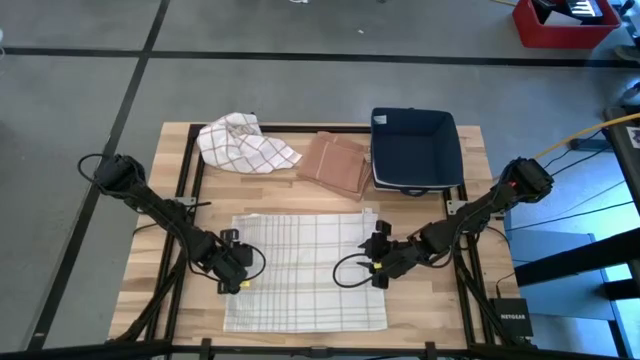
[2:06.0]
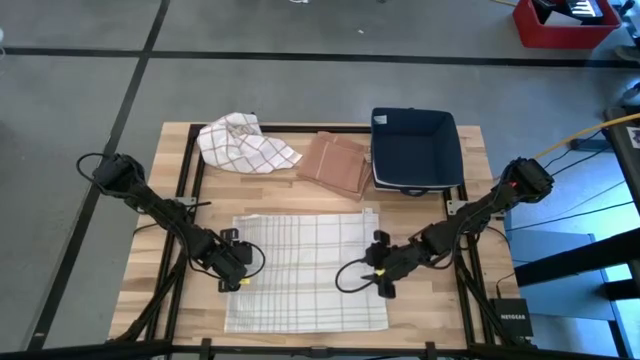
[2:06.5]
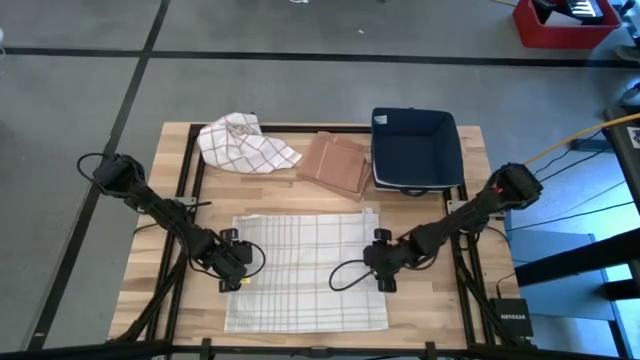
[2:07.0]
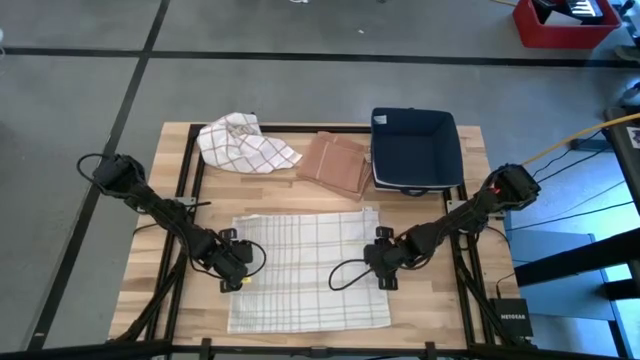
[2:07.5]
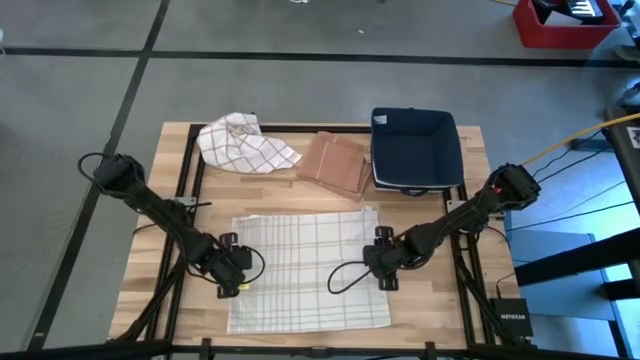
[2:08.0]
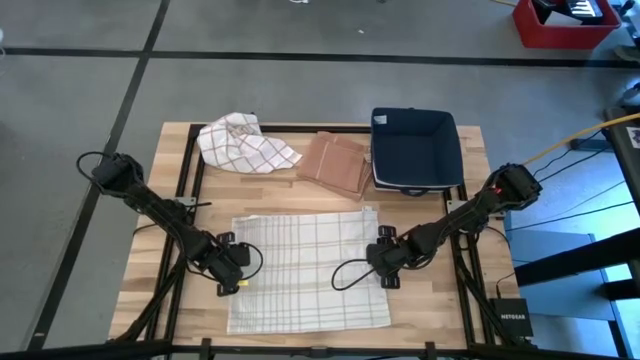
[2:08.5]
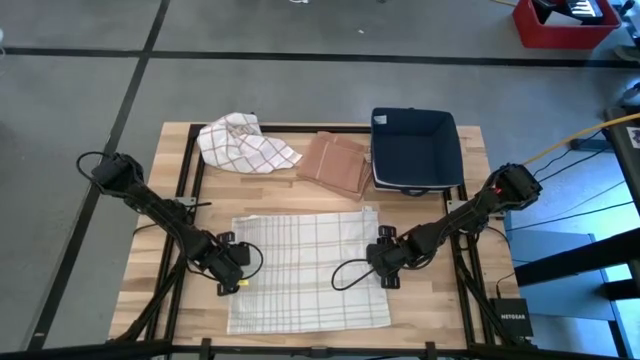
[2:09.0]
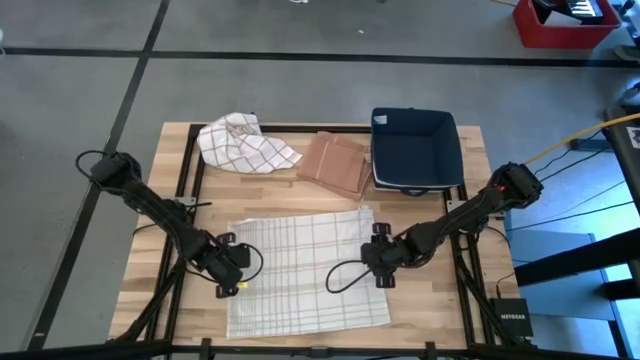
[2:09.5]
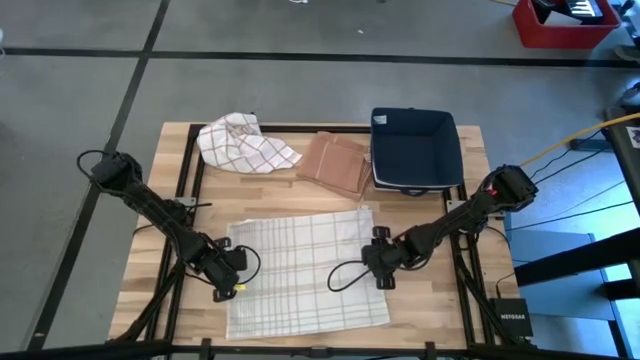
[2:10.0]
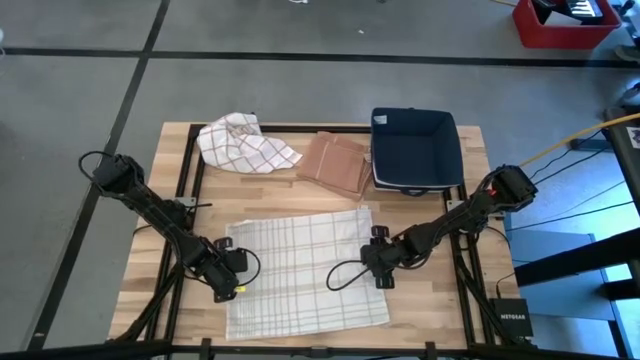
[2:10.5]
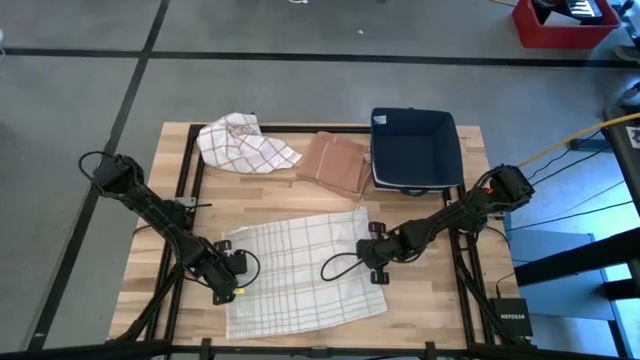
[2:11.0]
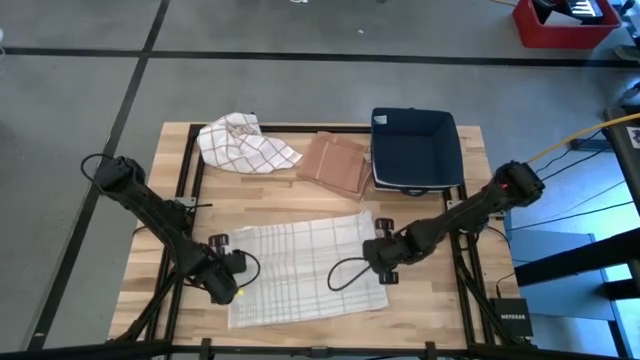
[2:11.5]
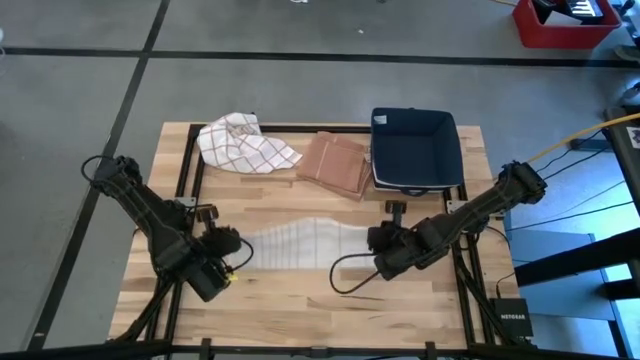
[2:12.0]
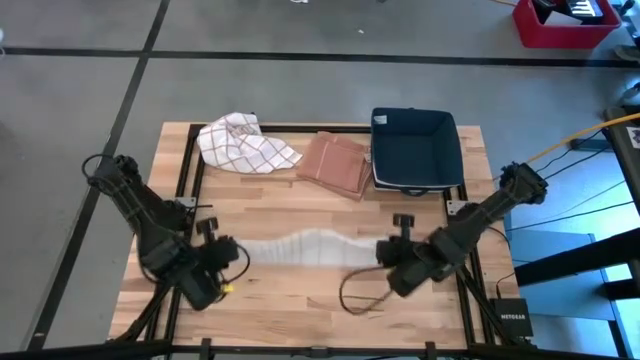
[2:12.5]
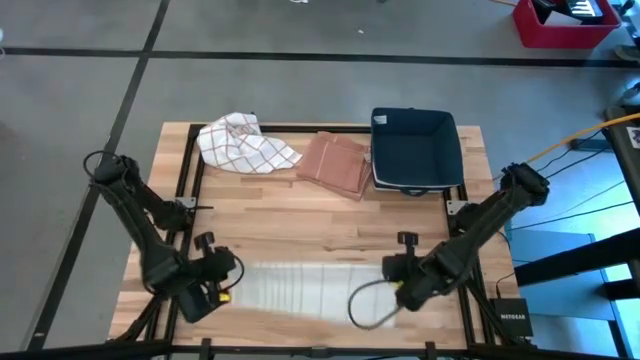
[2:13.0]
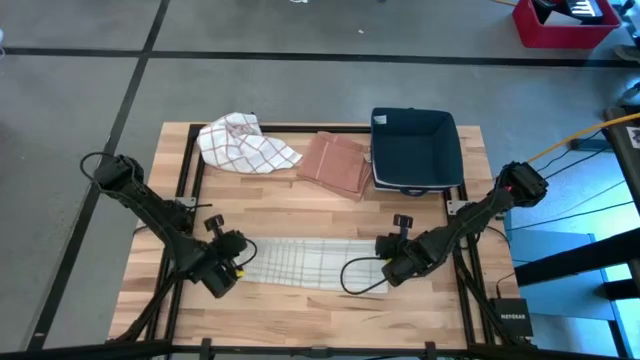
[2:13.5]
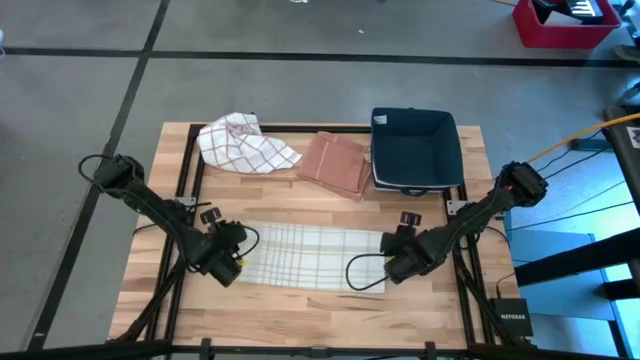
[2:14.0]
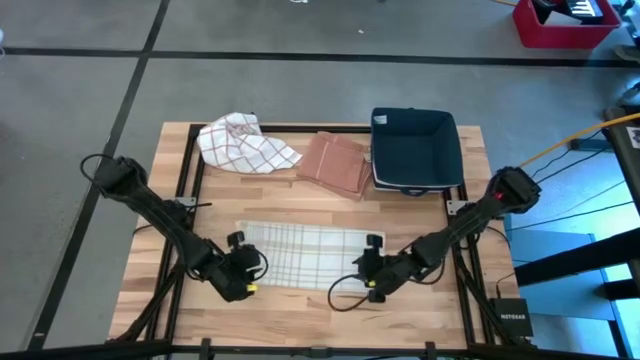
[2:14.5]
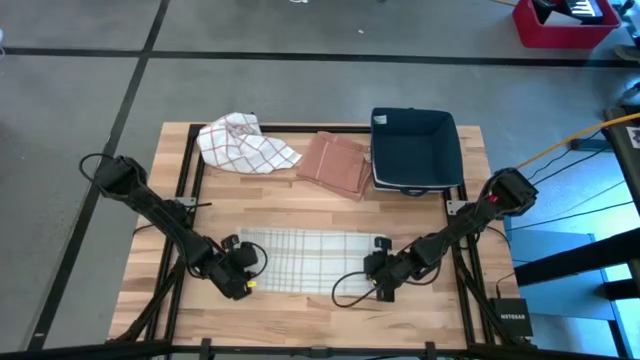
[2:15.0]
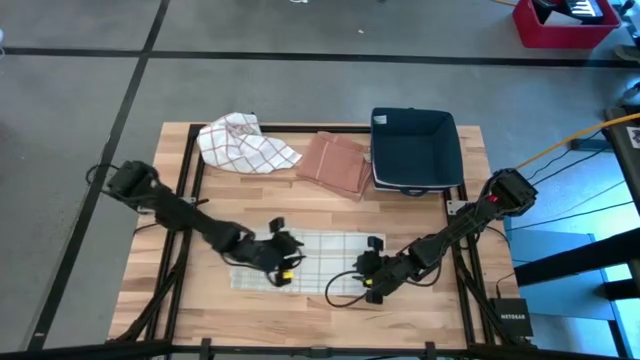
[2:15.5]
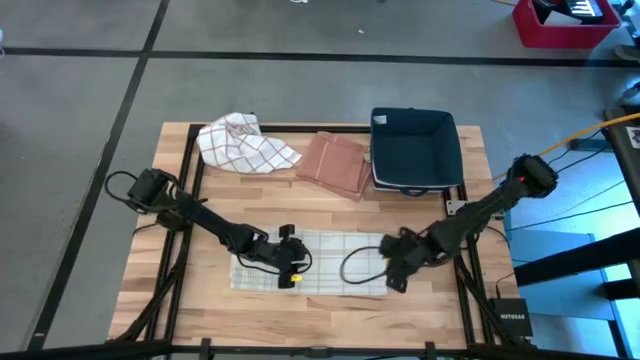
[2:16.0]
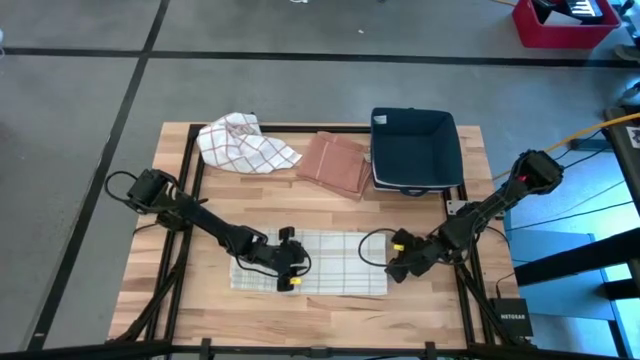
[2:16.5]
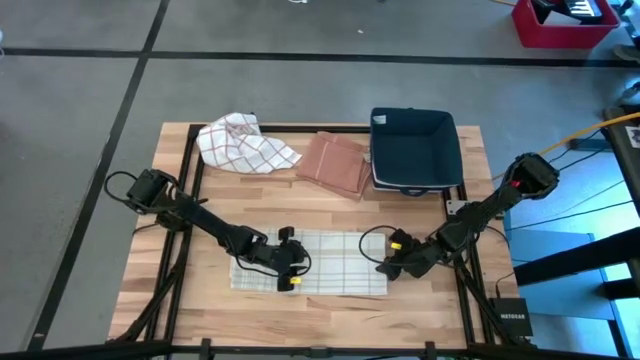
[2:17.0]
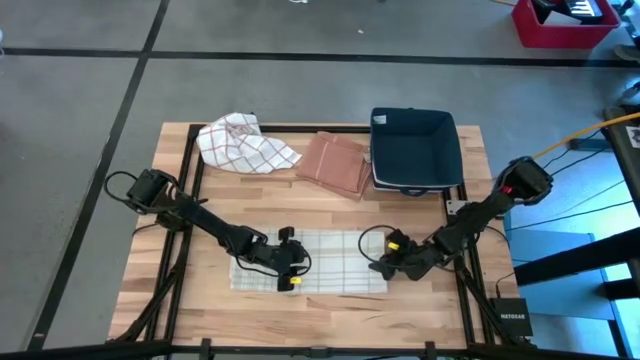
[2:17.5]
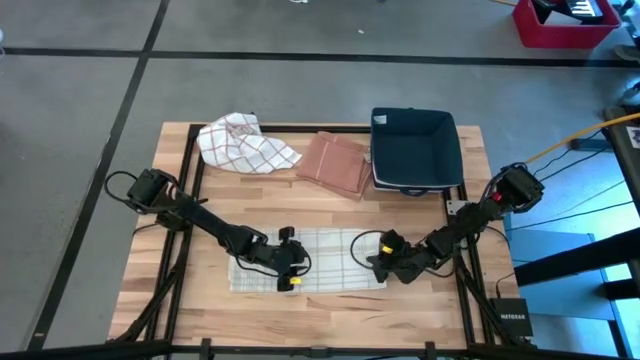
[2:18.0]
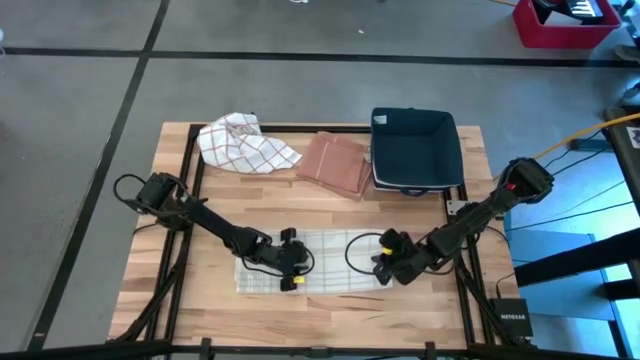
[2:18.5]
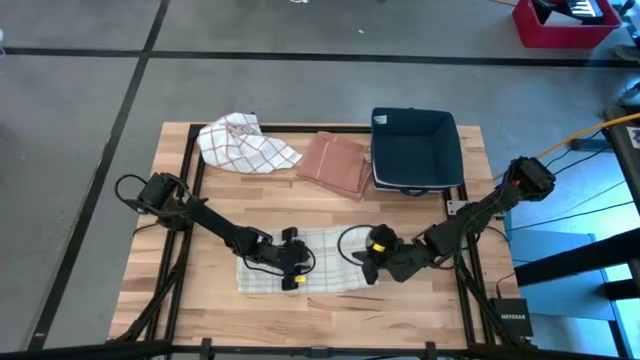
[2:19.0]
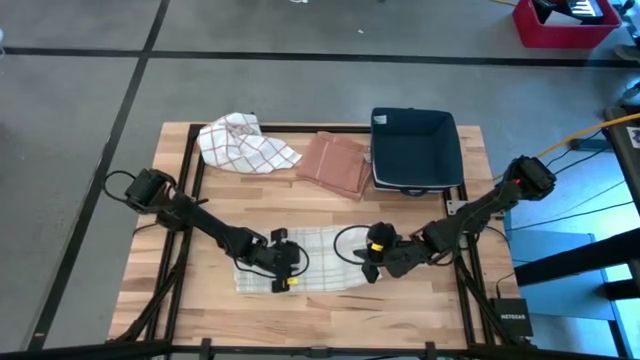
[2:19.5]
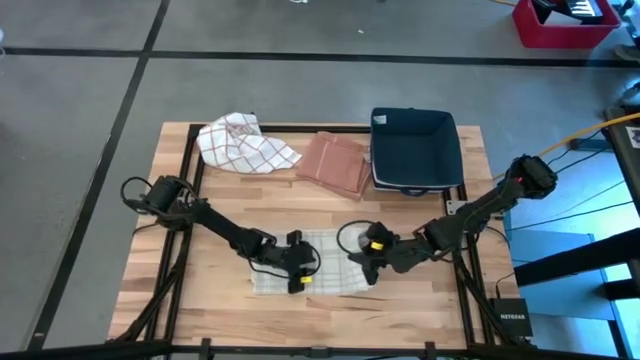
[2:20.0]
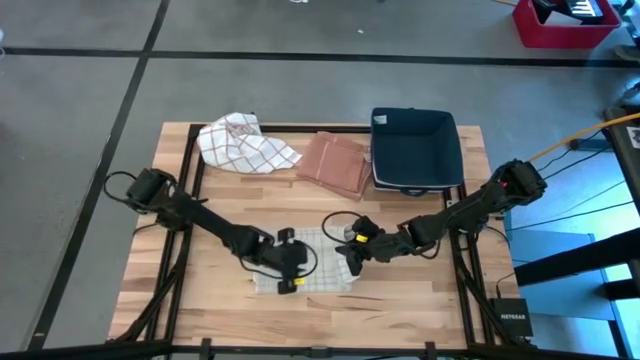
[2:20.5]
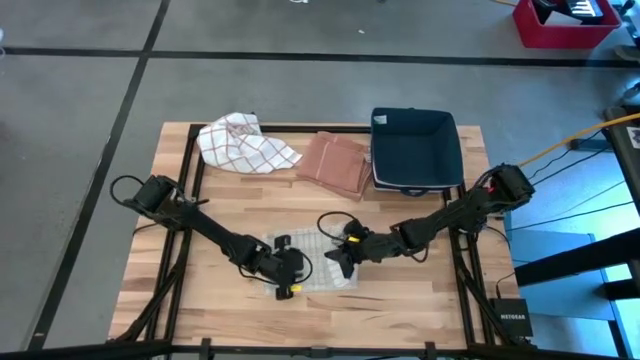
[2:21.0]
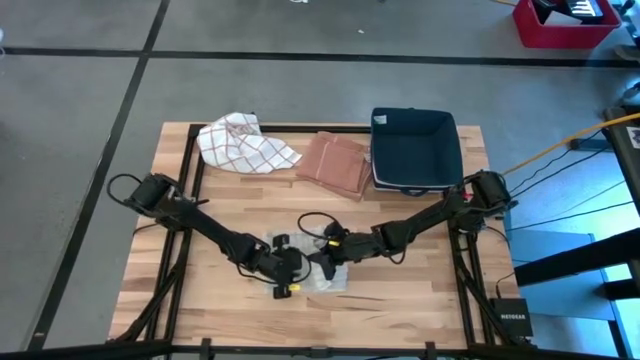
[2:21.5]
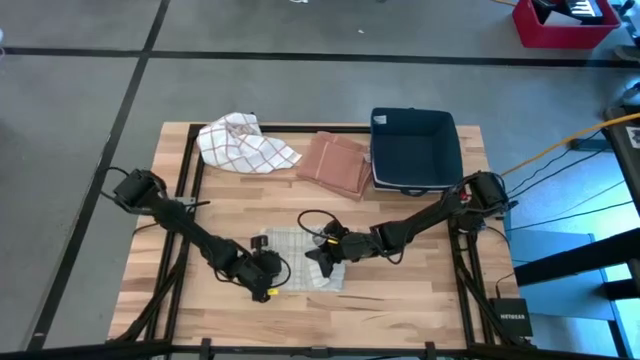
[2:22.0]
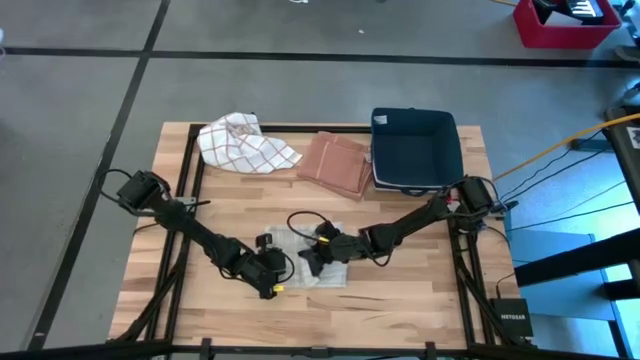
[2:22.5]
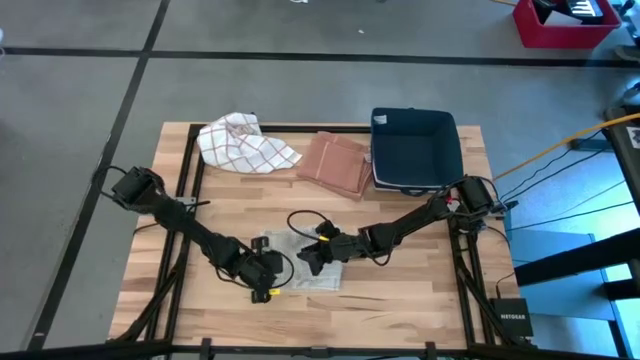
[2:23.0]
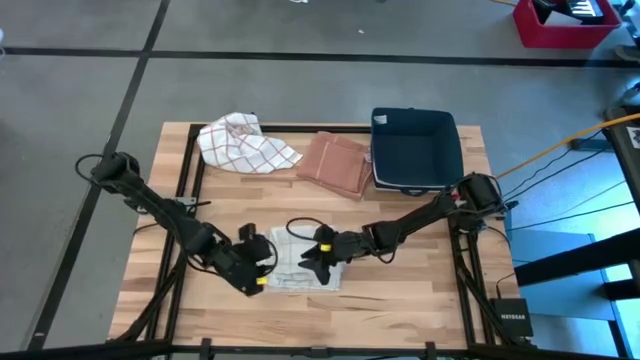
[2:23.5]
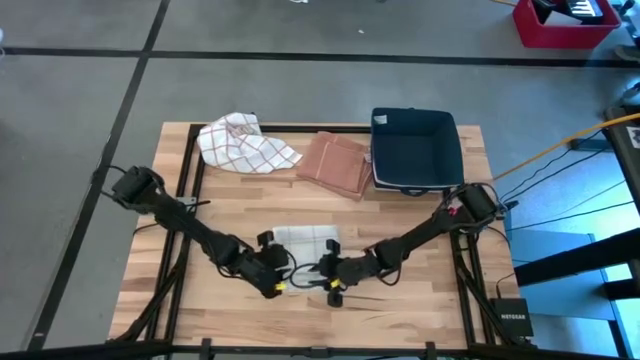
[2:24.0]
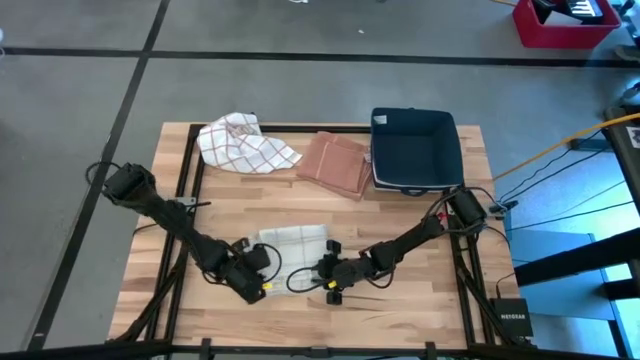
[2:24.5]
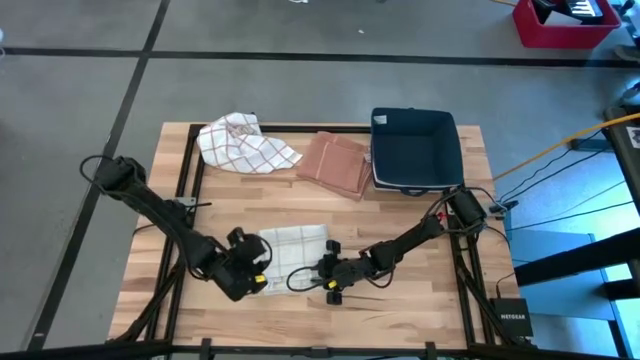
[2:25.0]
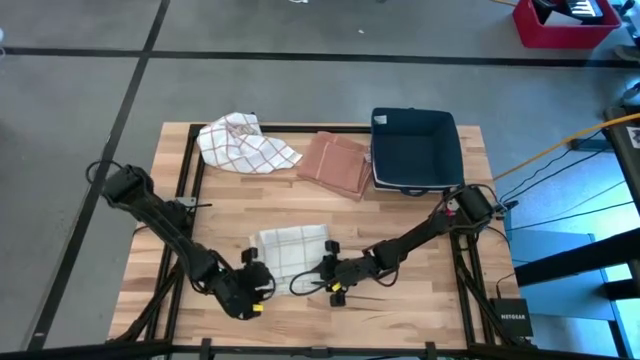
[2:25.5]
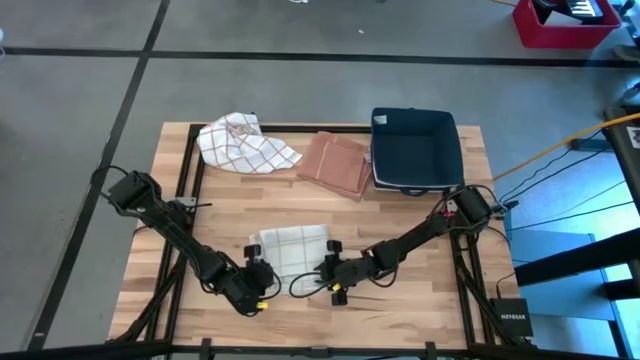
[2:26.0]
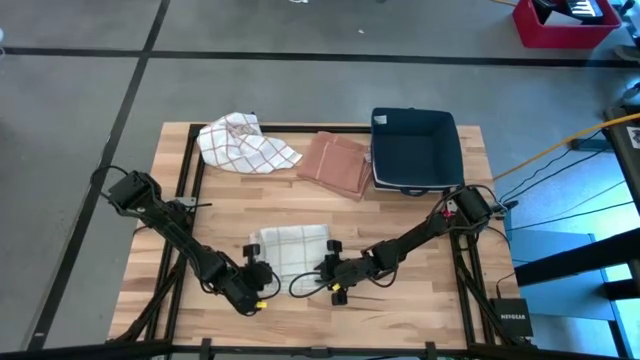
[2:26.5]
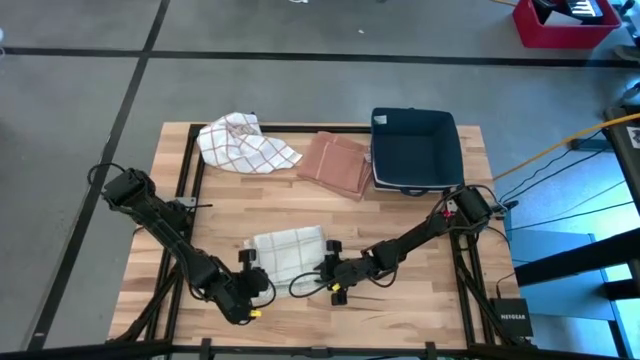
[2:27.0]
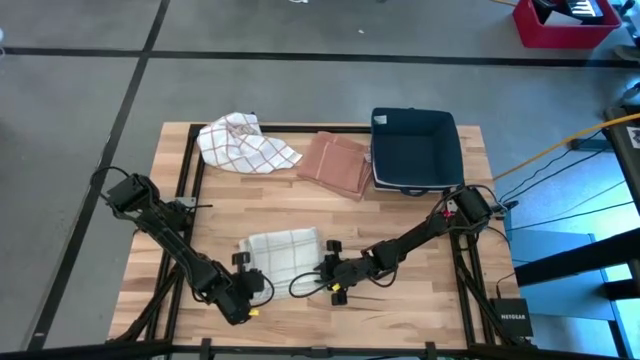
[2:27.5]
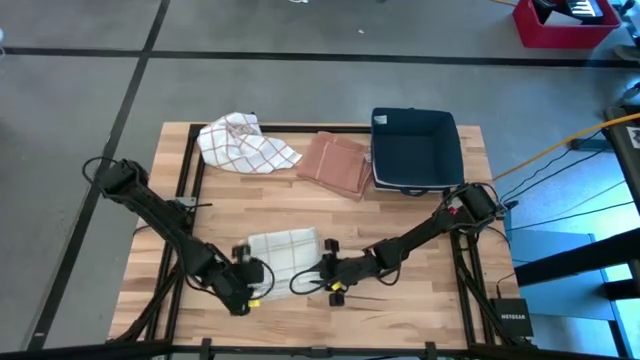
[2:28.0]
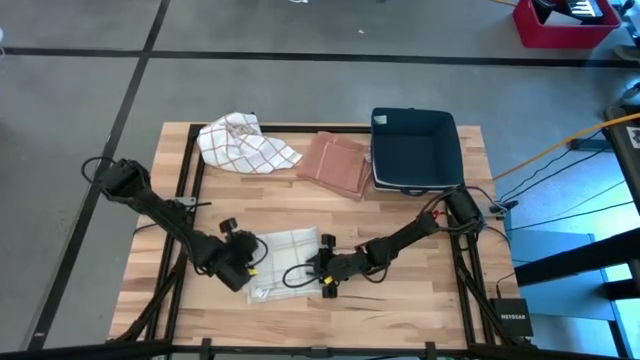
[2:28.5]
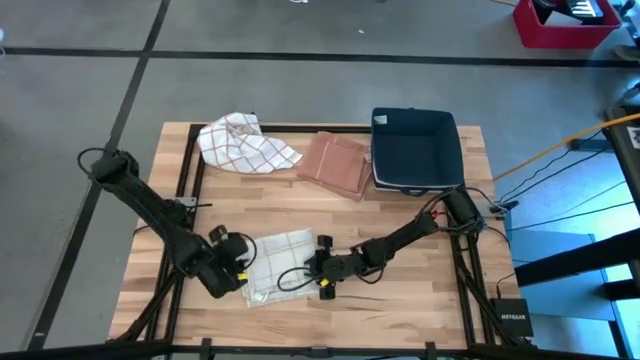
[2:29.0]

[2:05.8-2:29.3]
Task: Fold towel
Fold the bottom white towel
